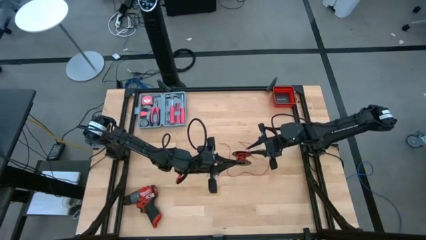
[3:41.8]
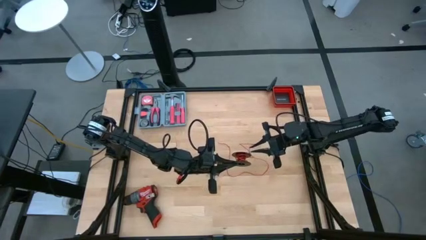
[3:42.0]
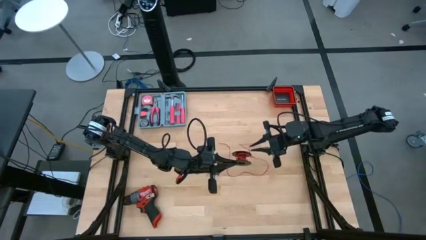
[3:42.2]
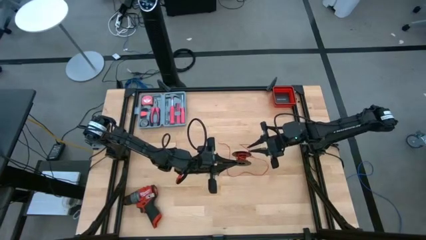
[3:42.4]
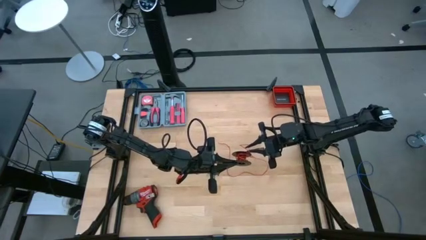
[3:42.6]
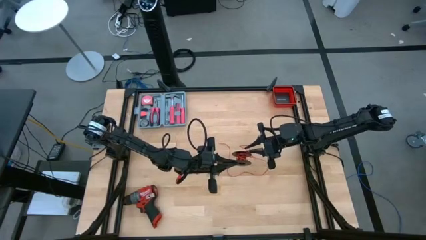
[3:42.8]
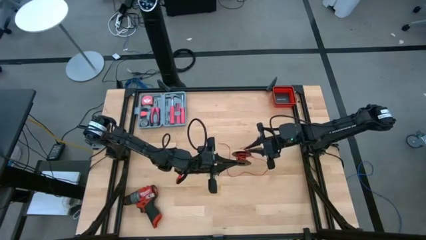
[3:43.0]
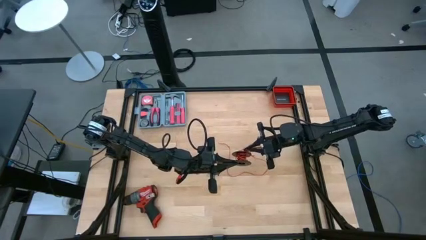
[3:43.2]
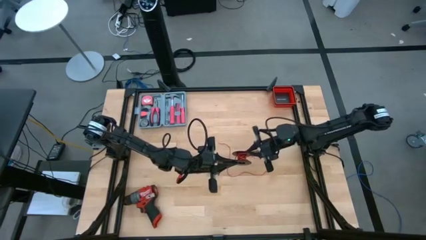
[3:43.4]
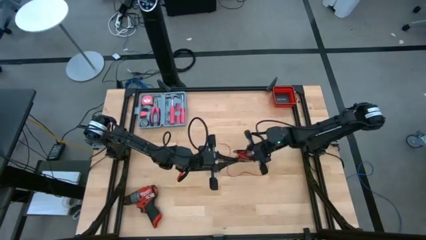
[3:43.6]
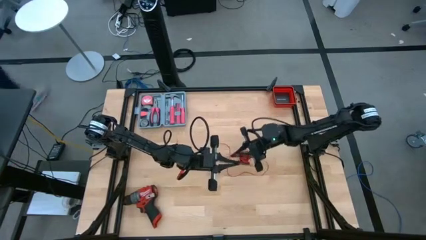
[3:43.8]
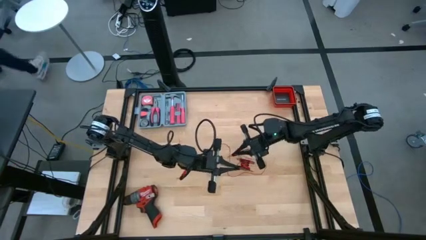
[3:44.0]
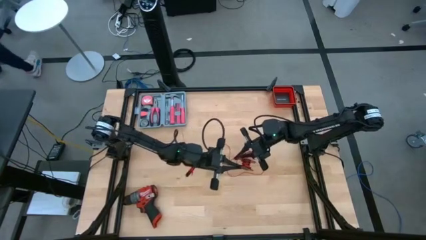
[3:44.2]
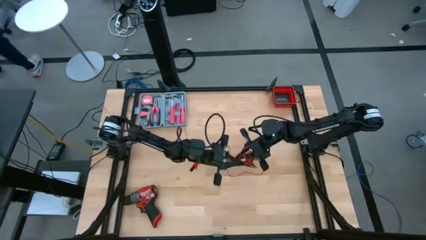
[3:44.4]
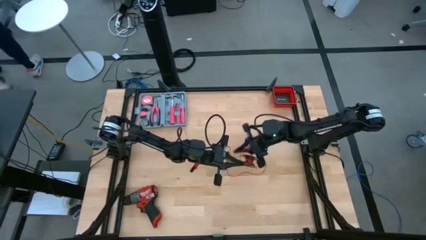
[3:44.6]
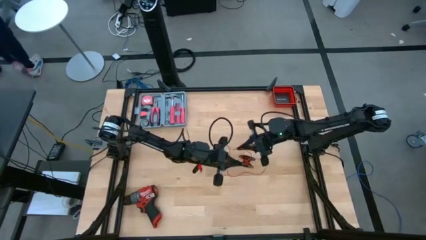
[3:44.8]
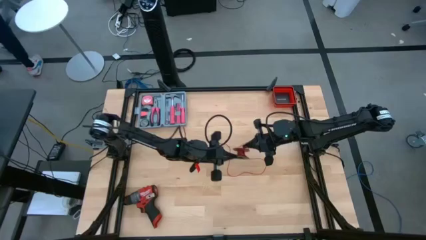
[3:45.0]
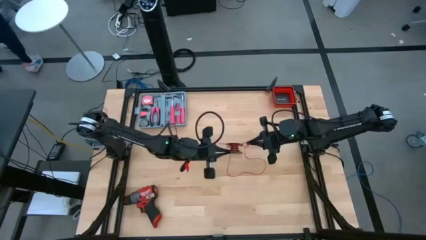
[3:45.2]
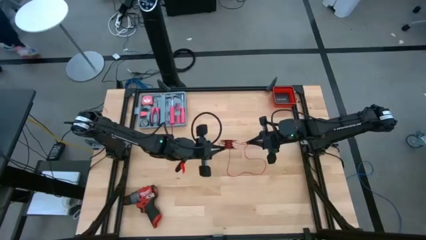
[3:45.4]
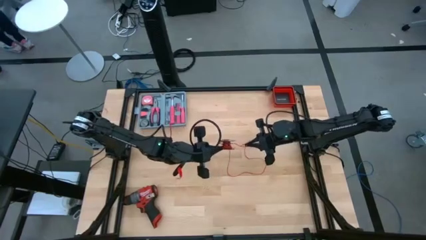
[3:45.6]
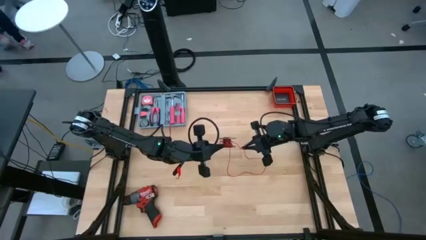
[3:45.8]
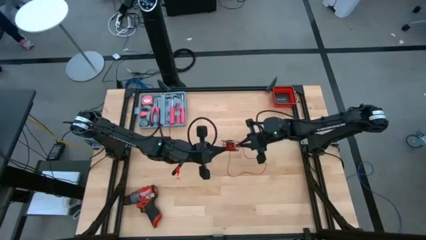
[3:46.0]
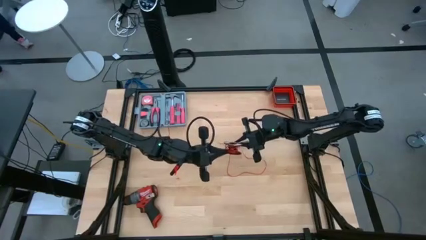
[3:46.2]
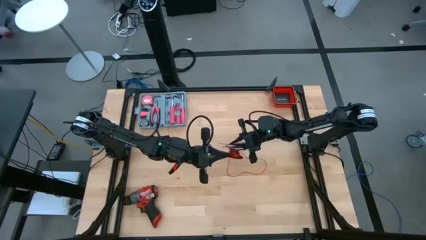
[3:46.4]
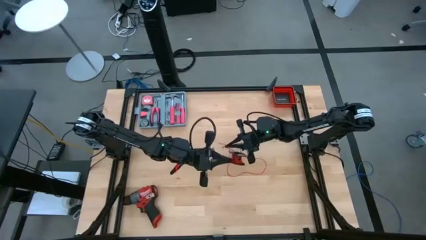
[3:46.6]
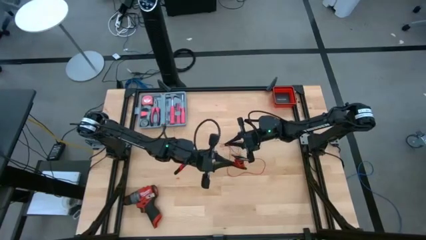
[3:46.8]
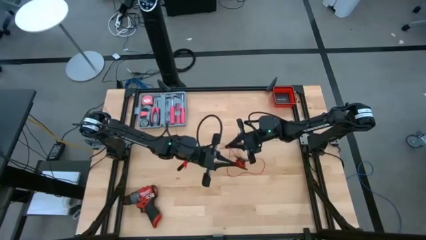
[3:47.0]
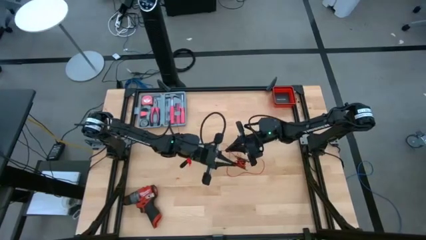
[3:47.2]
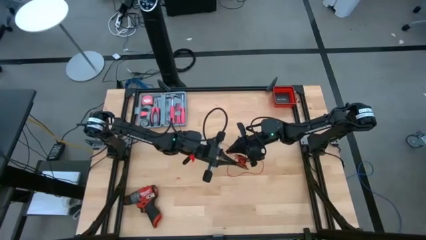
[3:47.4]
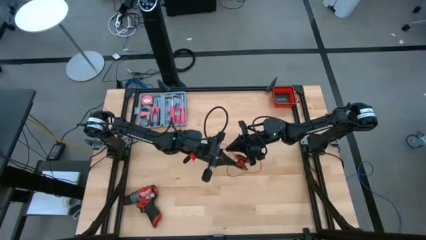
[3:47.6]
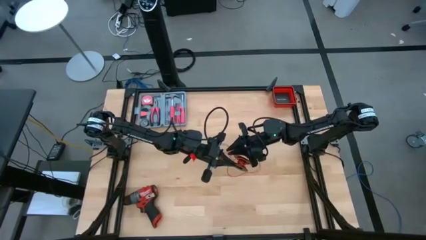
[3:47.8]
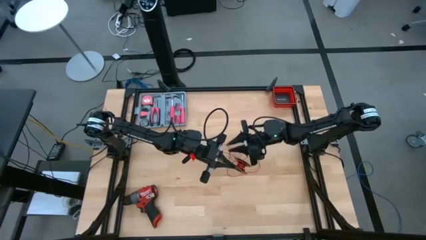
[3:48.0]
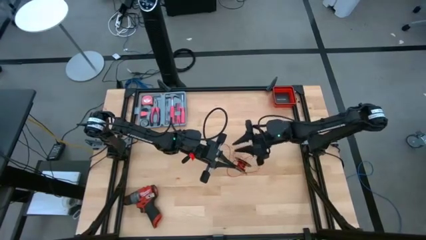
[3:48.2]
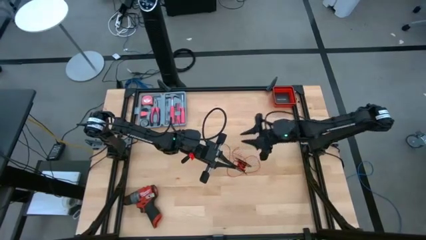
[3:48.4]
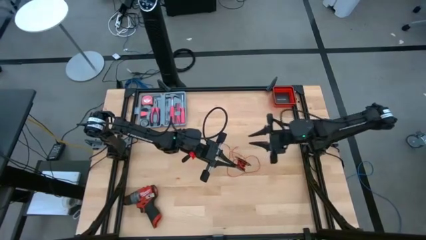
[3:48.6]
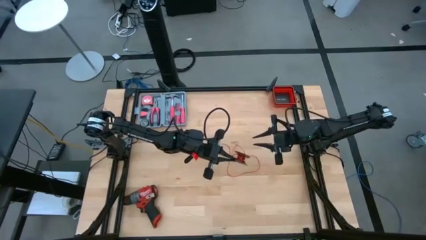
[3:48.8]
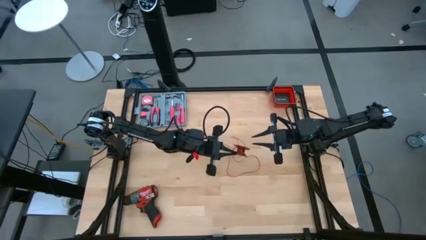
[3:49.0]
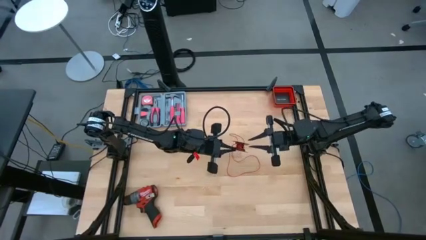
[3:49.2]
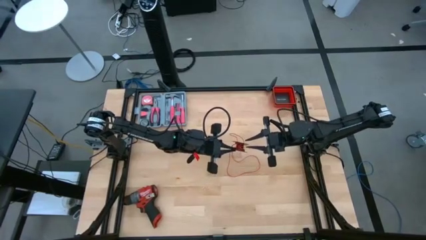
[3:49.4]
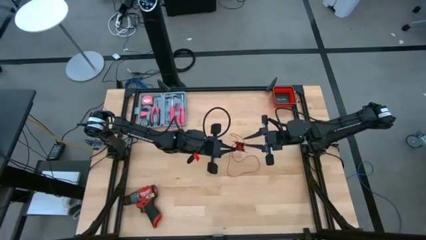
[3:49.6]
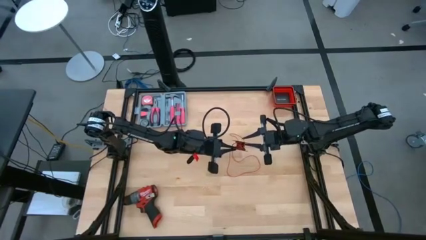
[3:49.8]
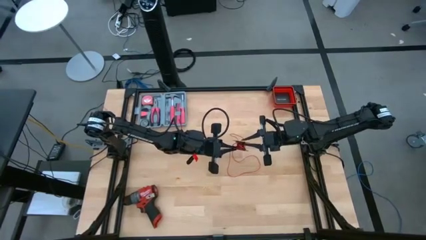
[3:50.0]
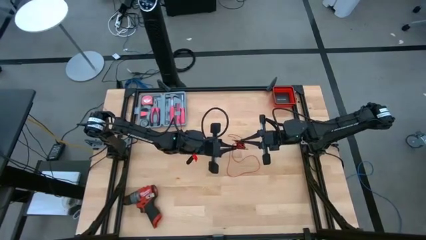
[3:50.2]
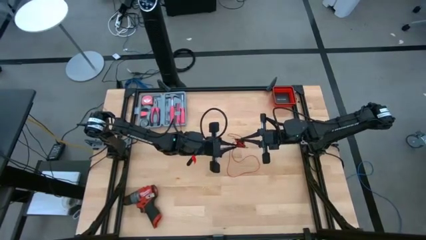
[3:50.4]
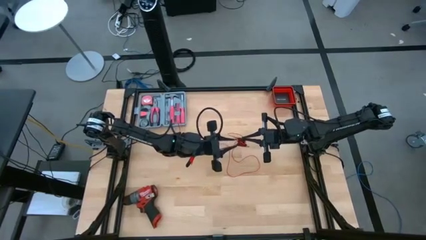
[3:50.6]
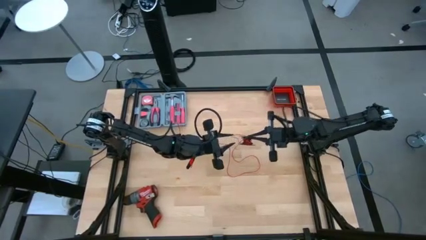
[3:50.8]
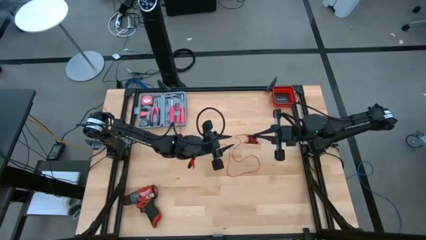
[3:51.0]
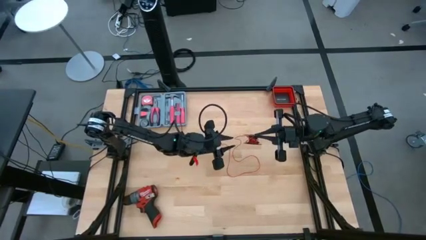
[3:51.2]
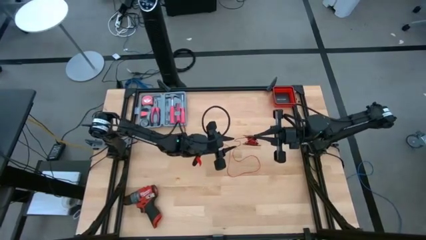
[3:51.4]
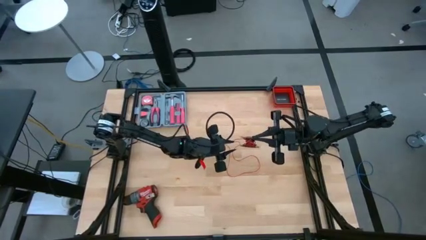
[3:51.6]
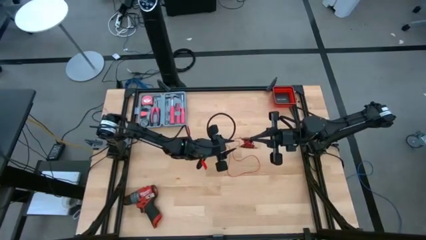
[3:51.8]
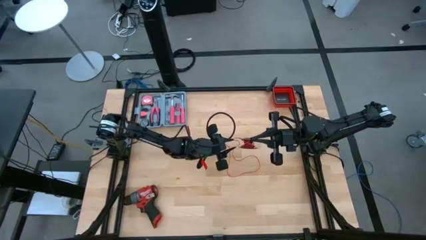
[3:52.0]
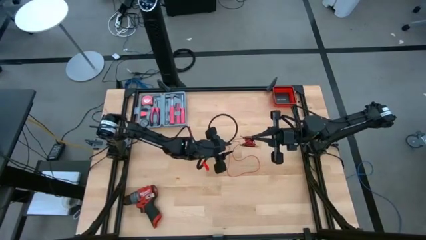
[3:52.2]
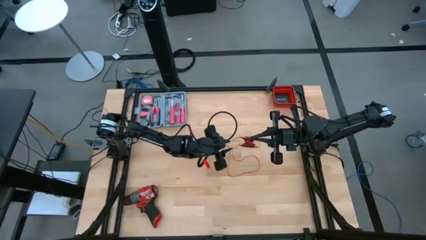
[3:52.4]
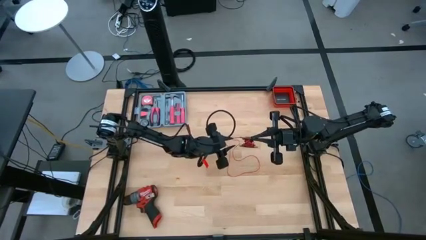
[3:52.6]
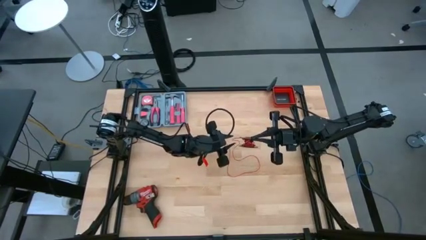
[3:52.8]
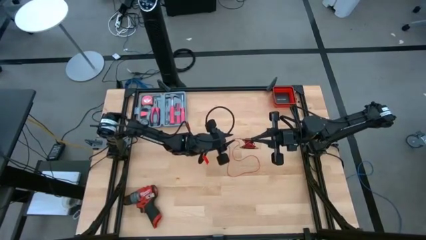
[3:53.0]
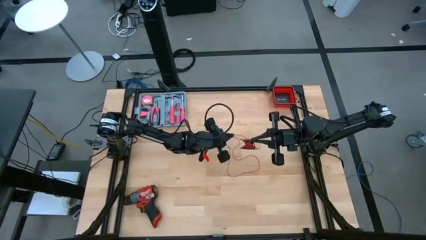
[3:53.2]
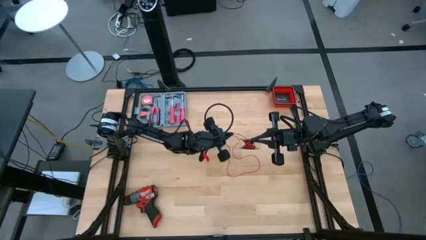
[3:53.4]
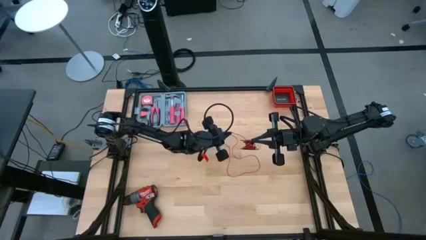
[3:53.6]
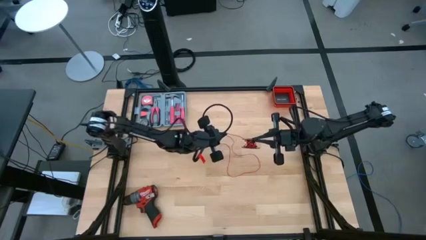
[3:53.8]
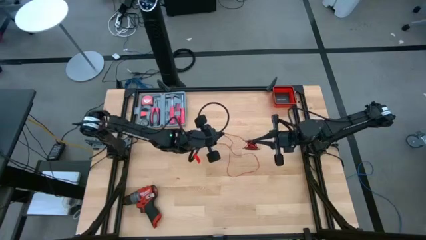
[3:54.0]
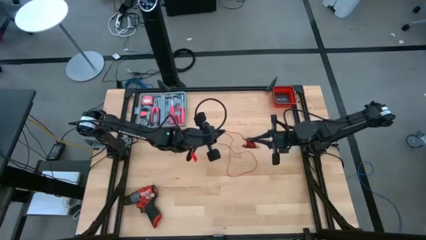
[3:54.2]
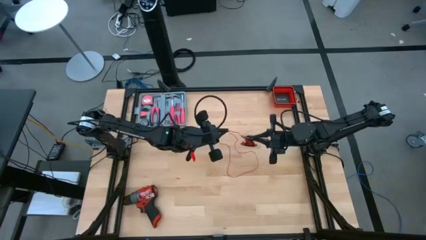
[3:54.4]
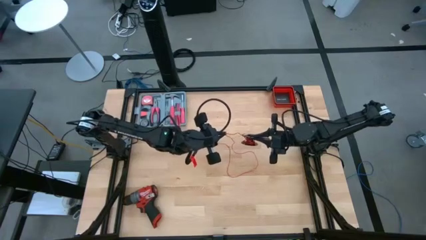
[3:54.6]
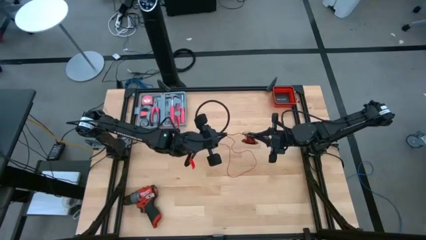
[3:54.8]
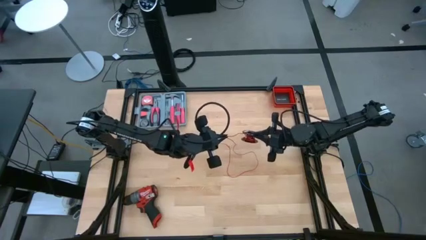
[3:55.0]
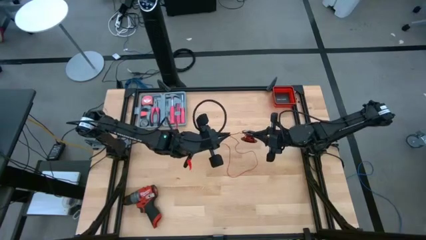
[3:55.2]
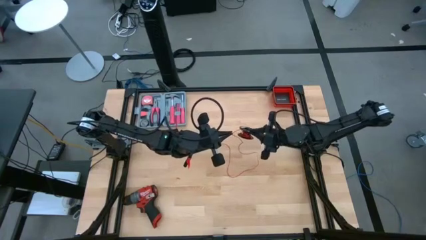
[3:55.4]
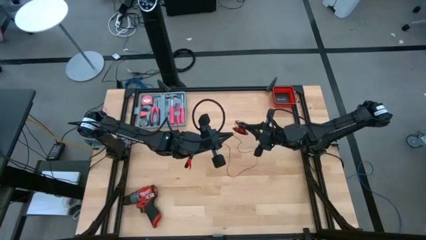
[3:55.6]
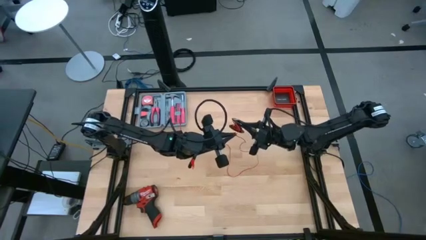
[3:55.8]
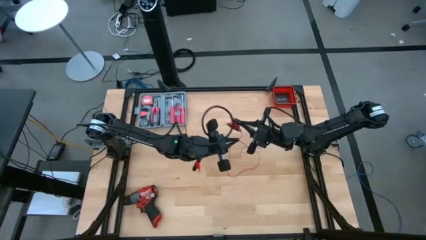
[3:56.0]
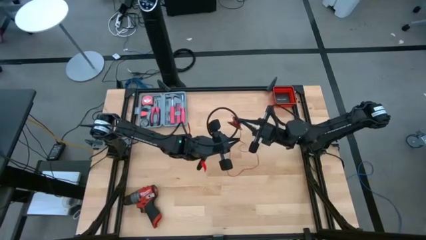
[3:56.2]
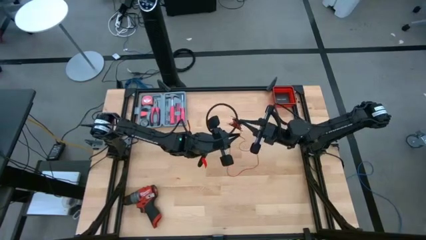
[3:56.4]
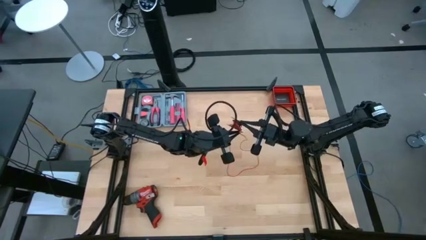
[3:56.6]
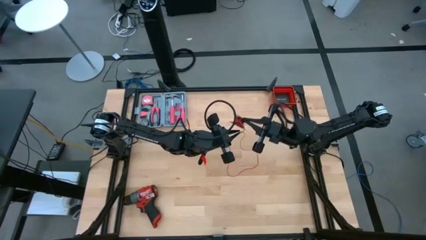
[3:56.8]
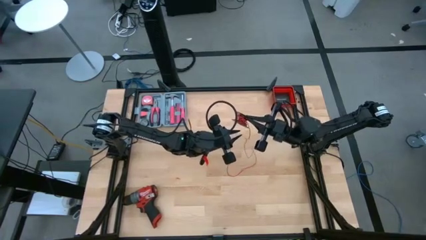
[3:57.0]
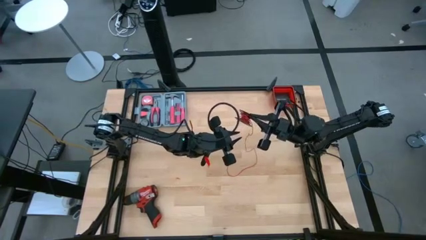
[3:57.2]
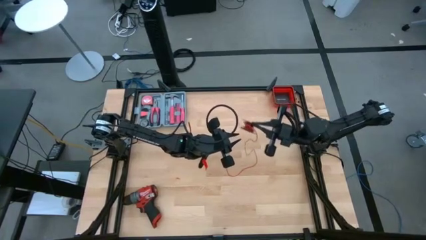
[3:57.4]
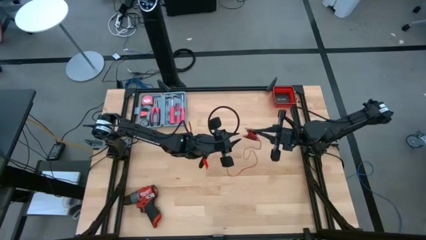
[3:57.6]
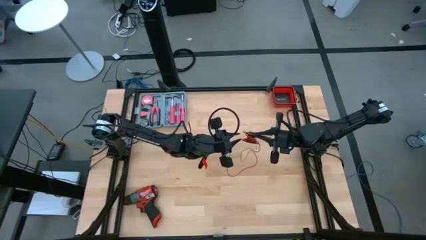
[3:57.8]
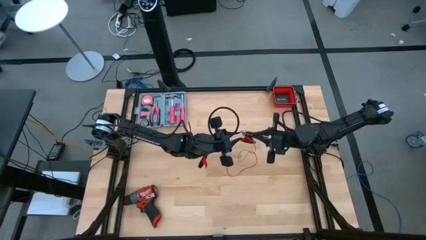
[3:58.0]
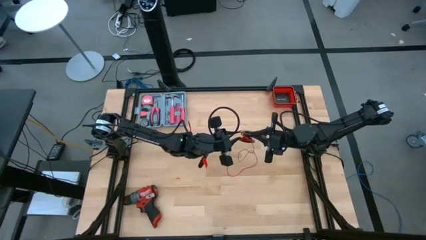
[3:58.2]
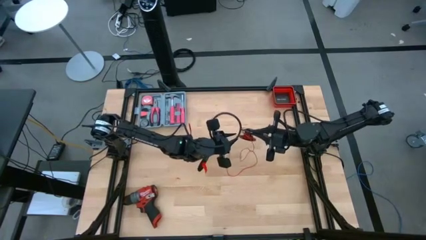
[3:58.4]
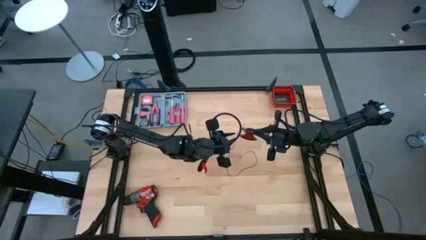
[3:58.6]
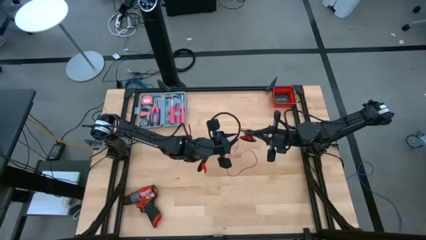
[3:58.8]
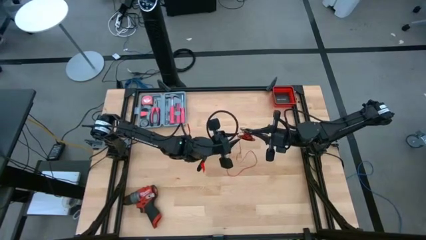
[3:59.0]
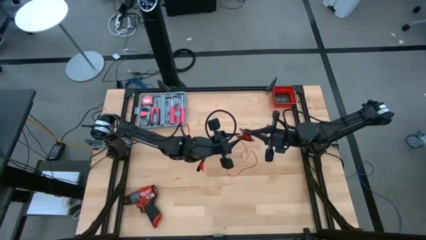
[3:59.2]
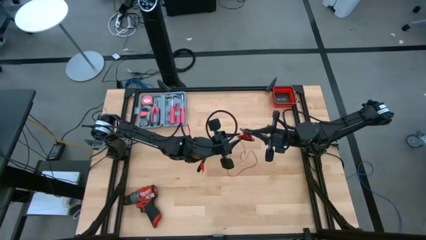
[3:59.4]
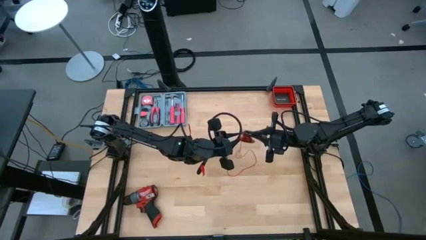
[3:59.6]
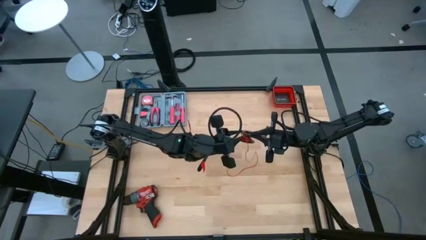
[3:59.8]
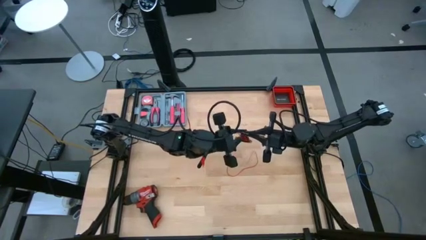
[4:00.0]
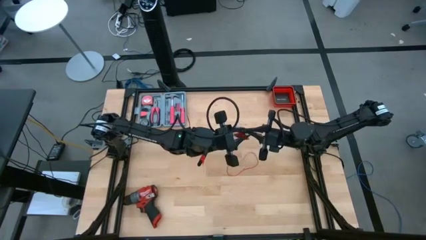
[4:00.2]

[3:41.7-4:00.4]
Task: Coil cords
Coil the red wire on the black spool
